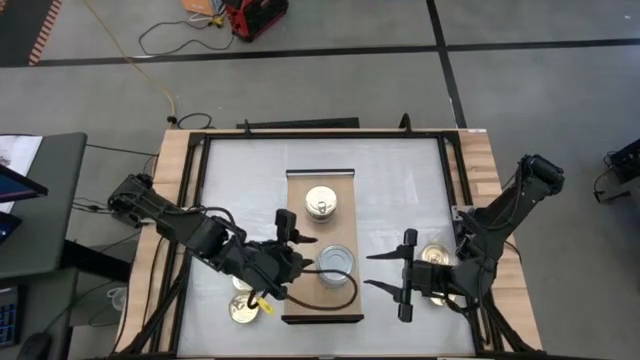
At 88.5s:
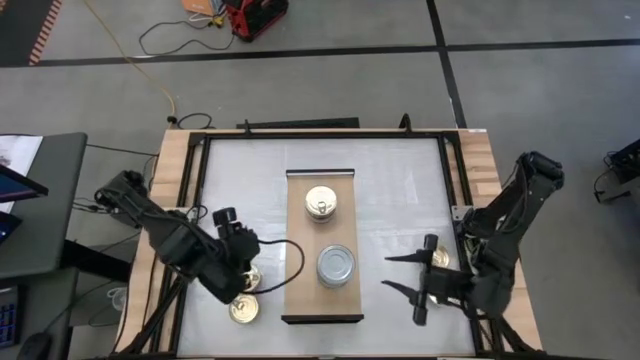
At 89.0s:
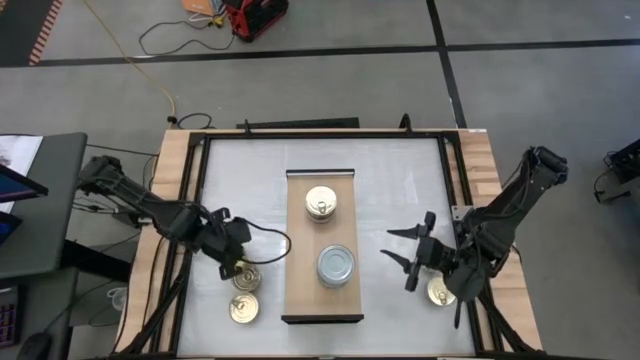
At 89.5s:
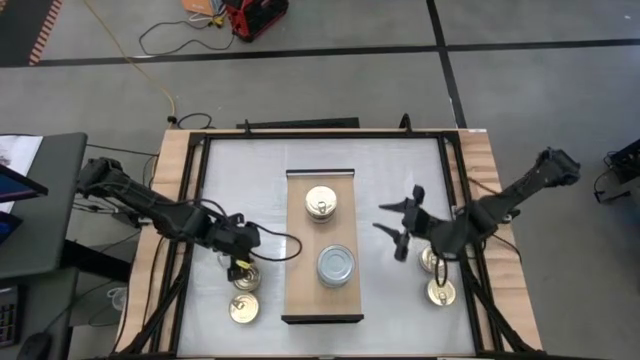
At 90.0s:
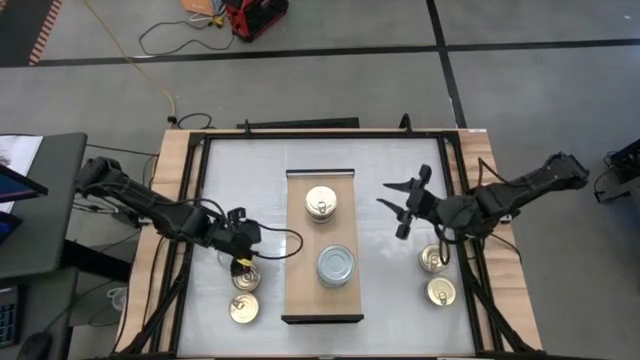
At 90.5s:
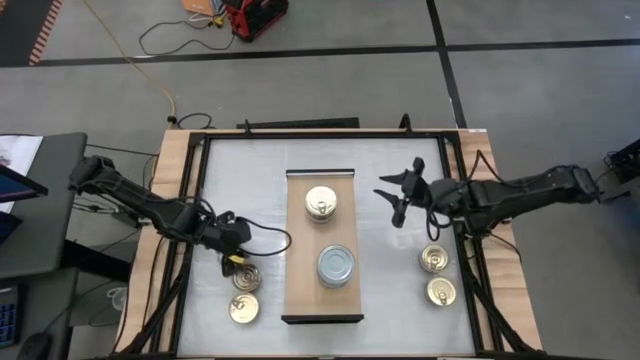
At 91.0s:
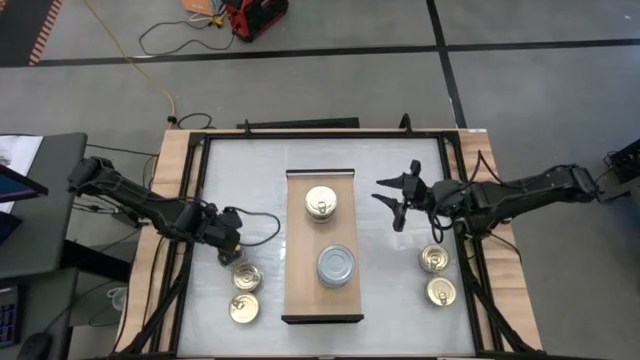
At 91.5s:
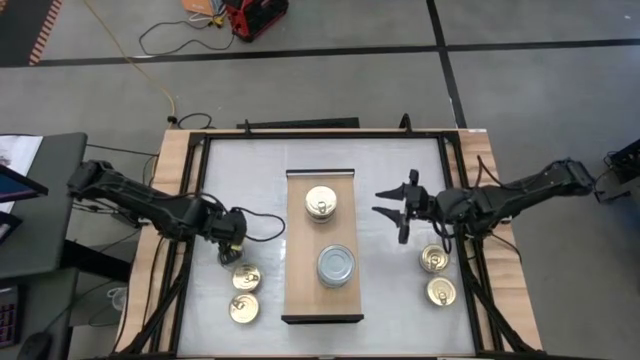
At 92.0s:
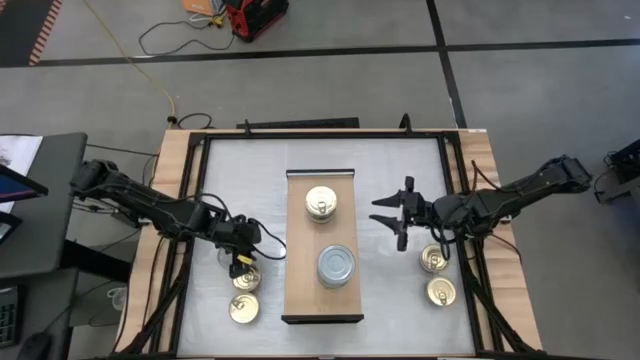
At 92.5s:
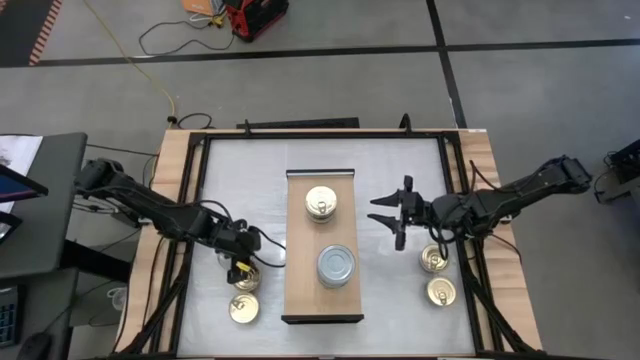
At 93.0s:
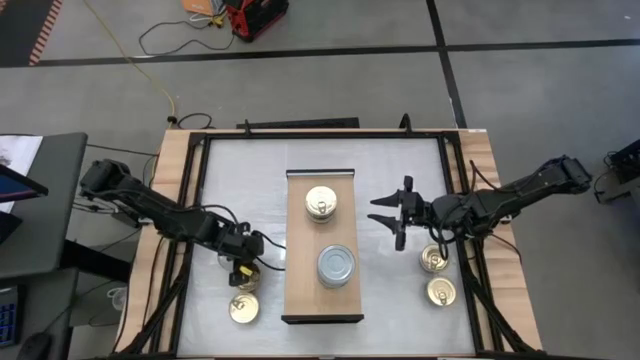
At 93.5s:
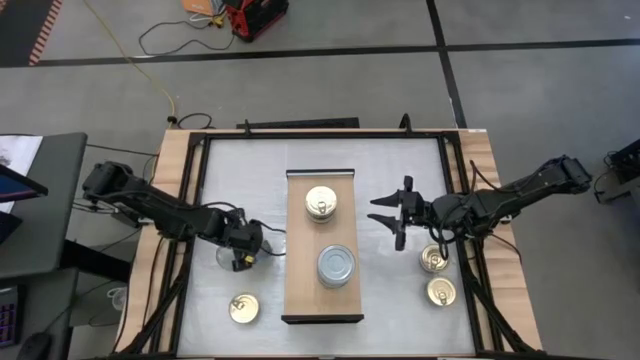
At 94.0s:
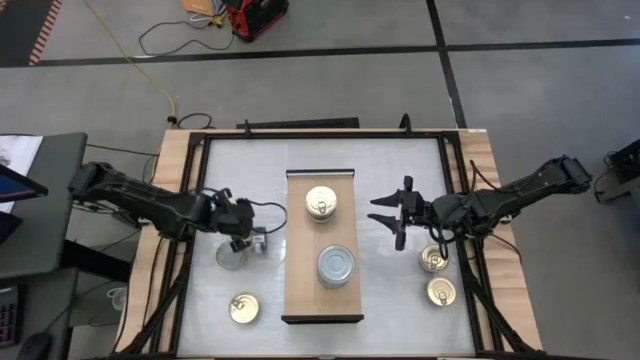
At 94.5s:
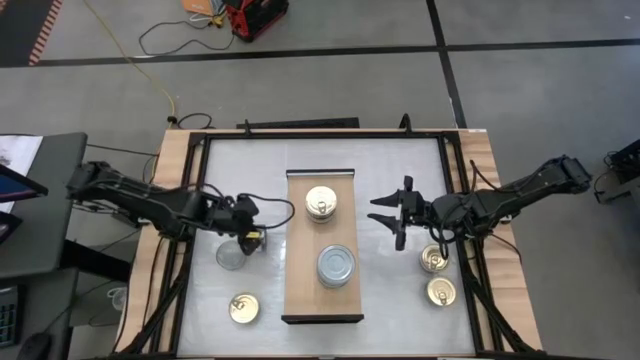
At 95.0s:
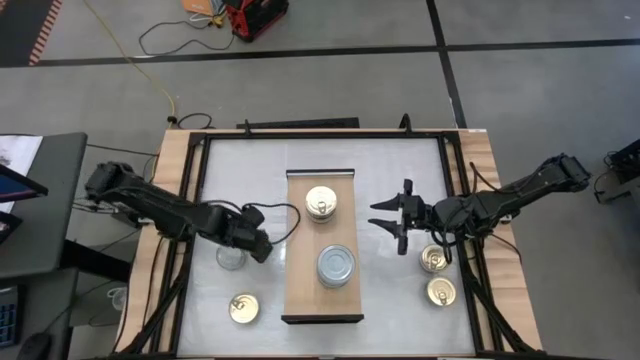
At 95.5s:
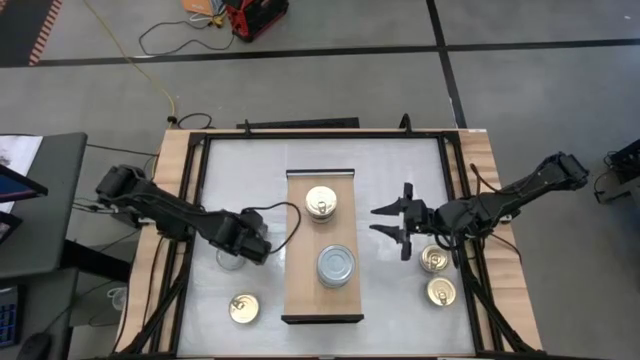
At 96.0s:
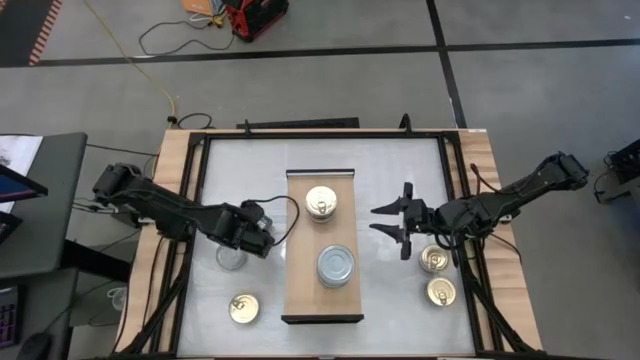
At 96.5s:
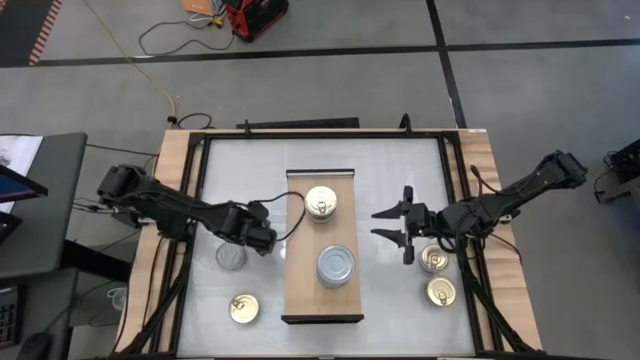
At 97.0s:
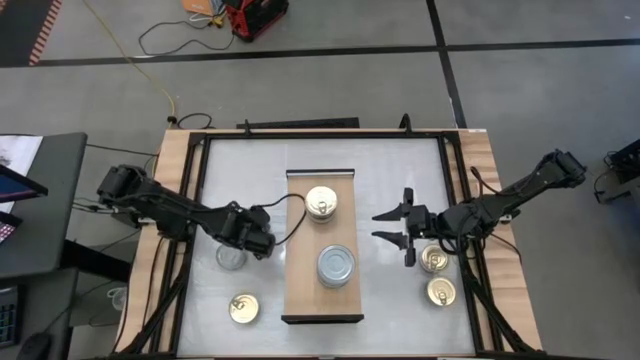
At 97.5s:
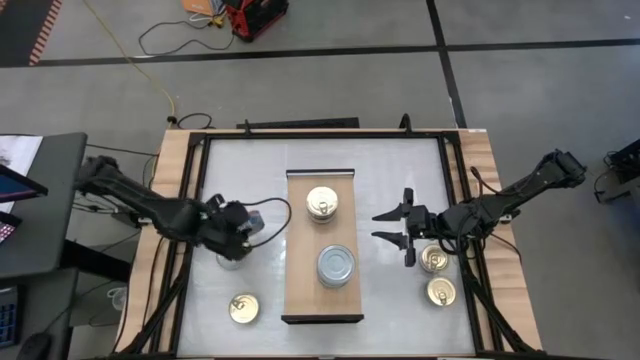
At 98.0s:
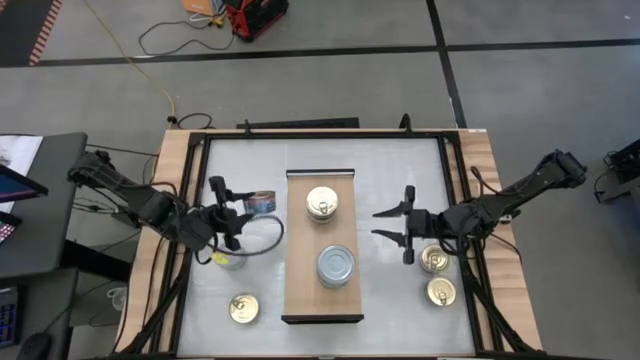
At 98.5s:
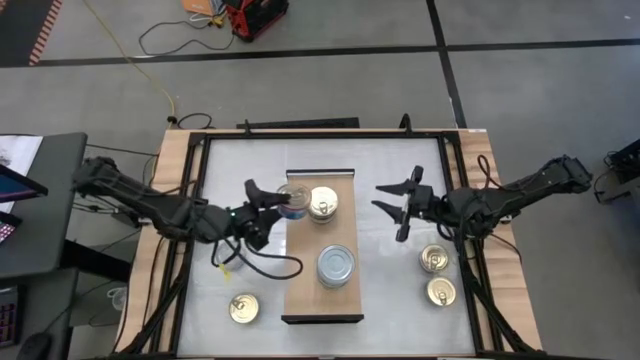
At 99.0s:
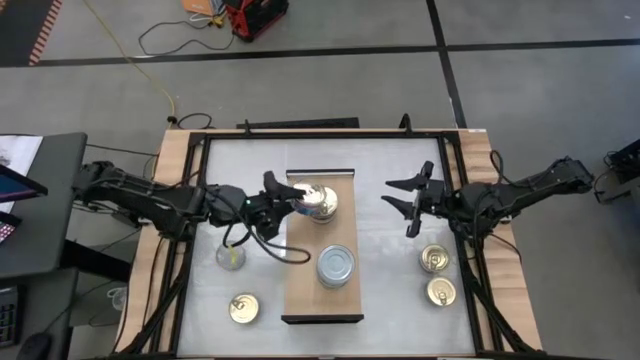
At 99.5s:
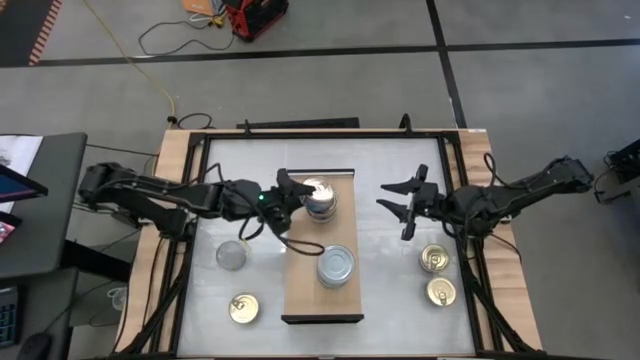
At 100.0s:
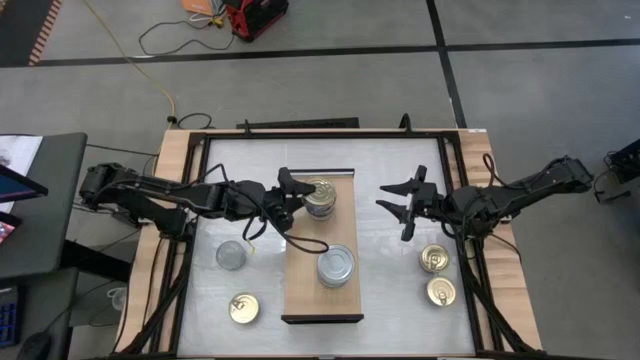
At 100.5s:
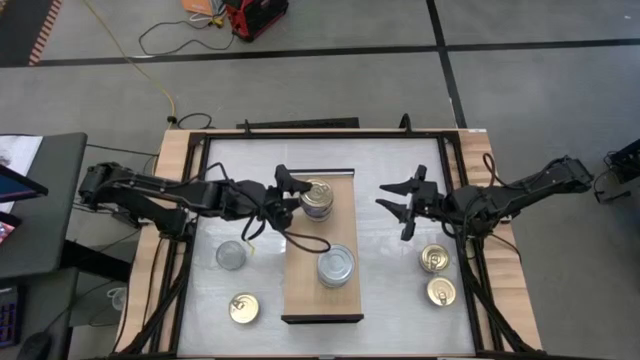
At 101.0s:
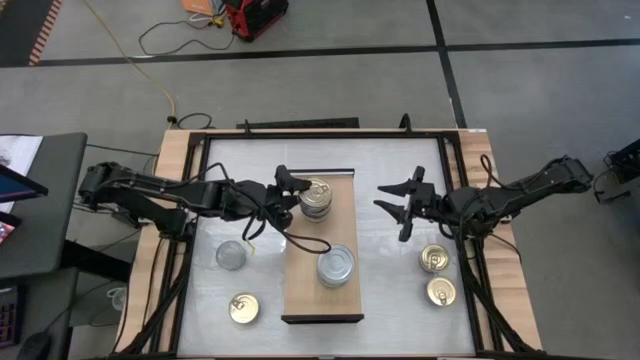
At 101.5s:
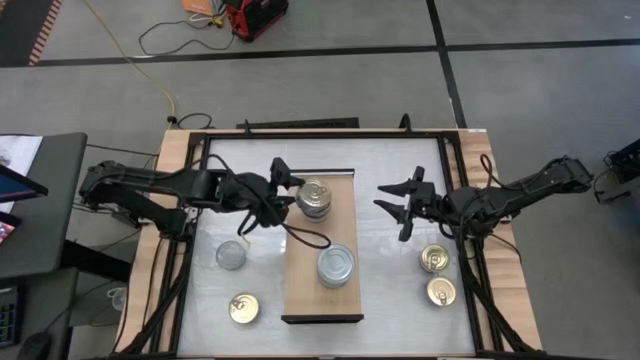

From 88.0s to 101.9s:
Task: Stack canned seafood by type on shelf
Stack the blue tuna can on top of the stacked blue tuna cans on the shelf

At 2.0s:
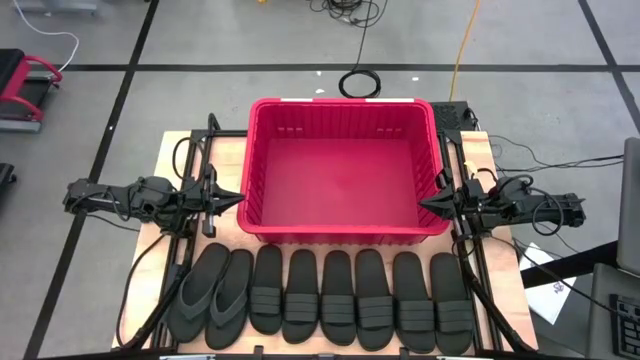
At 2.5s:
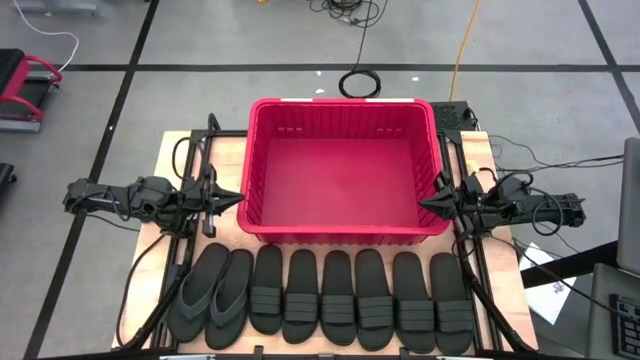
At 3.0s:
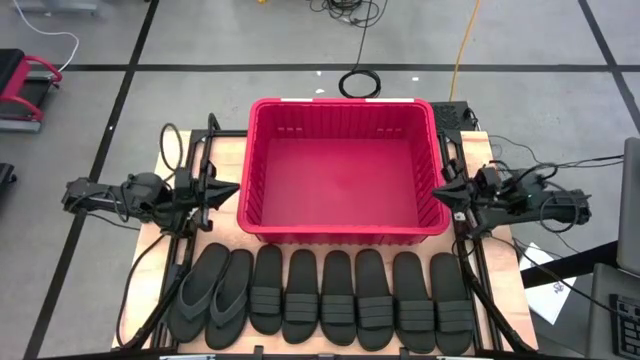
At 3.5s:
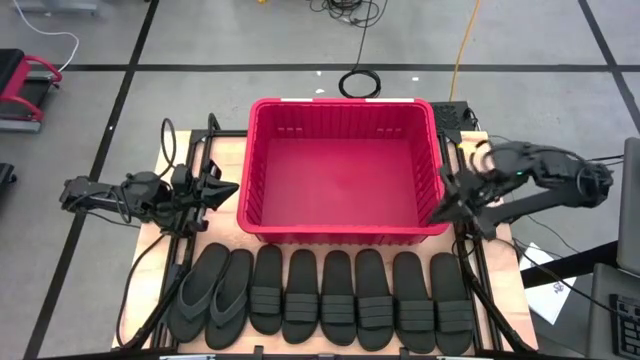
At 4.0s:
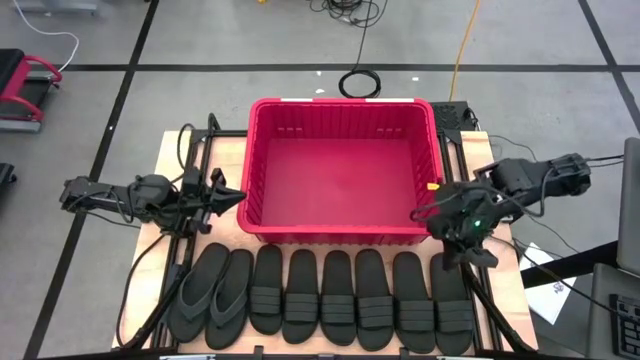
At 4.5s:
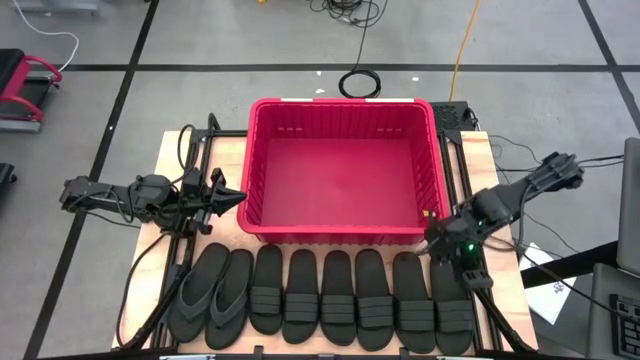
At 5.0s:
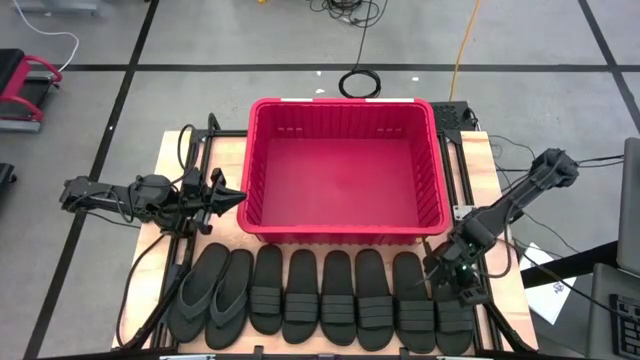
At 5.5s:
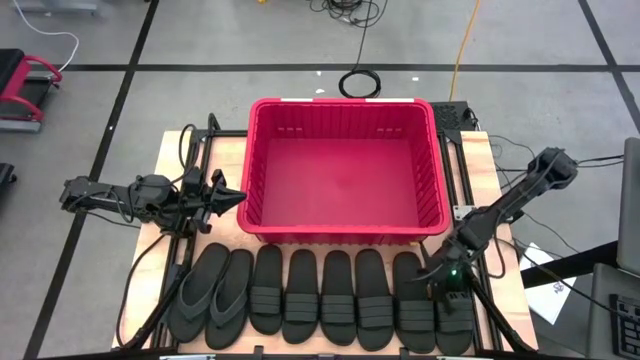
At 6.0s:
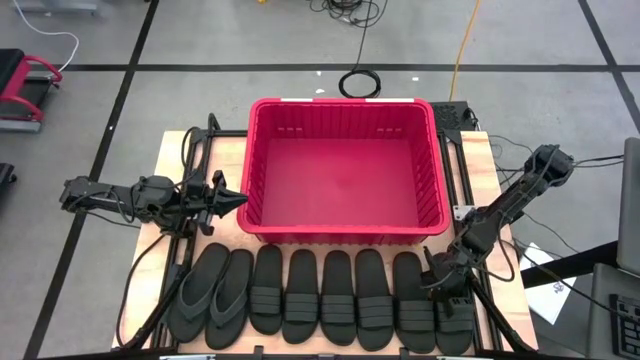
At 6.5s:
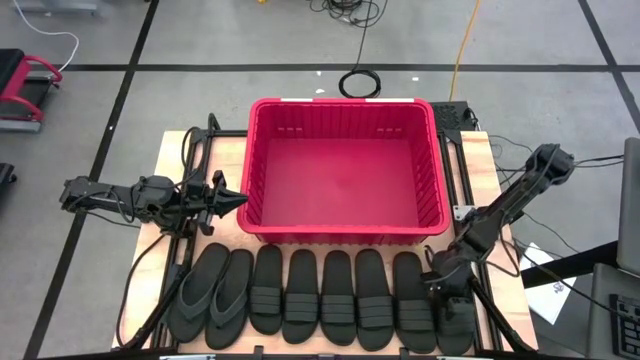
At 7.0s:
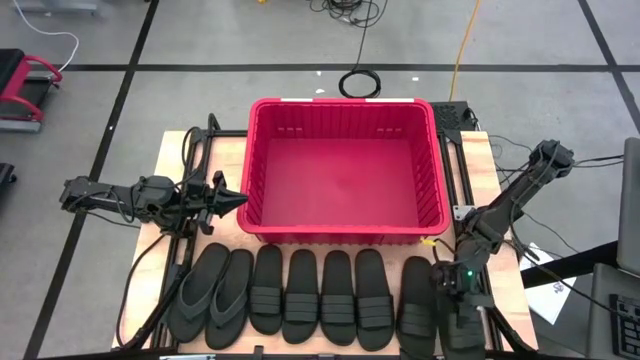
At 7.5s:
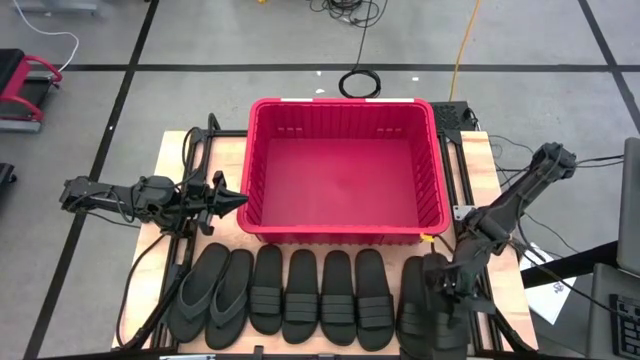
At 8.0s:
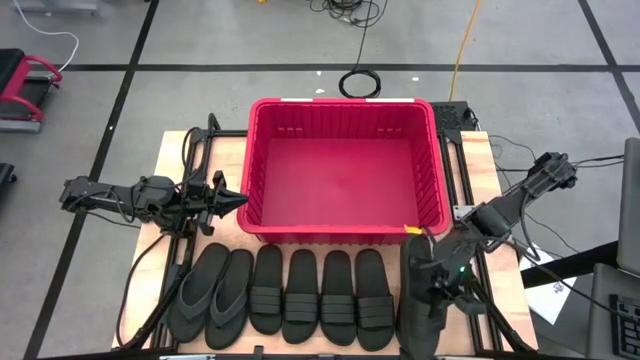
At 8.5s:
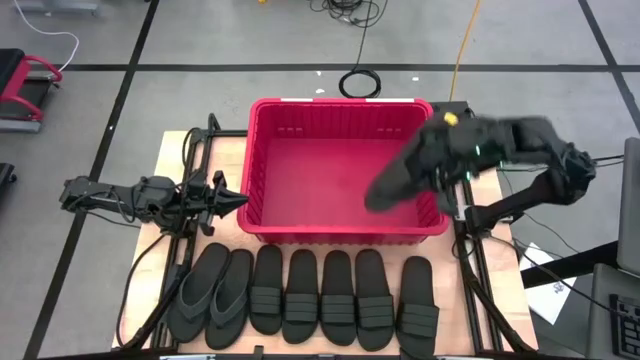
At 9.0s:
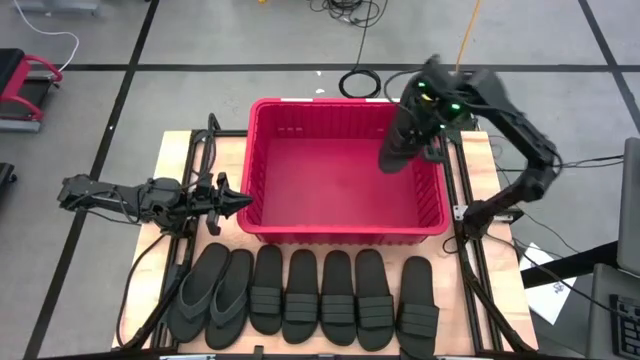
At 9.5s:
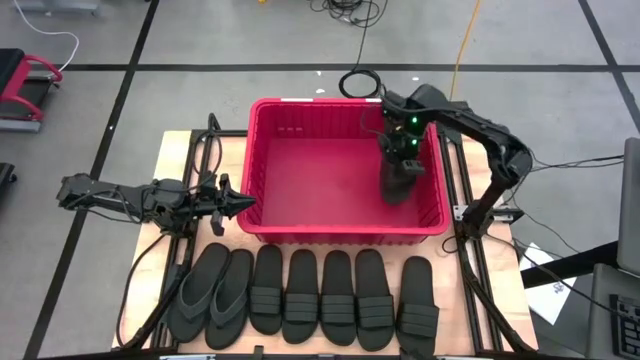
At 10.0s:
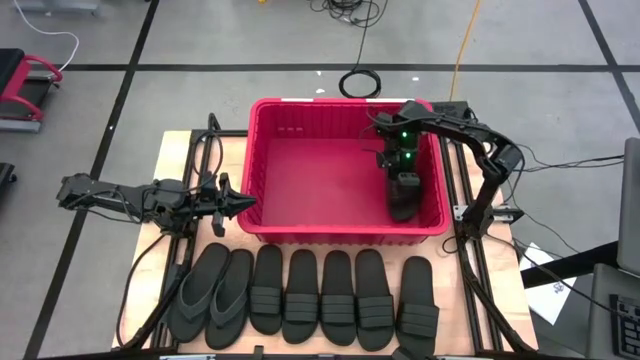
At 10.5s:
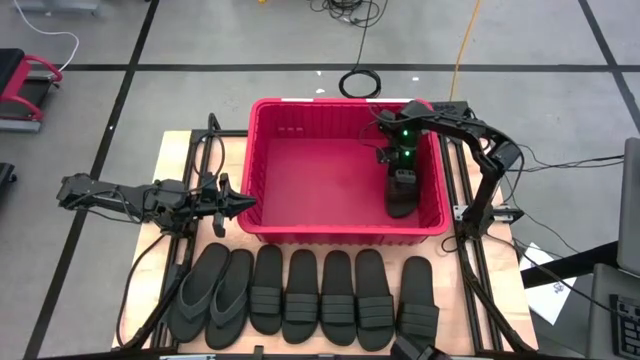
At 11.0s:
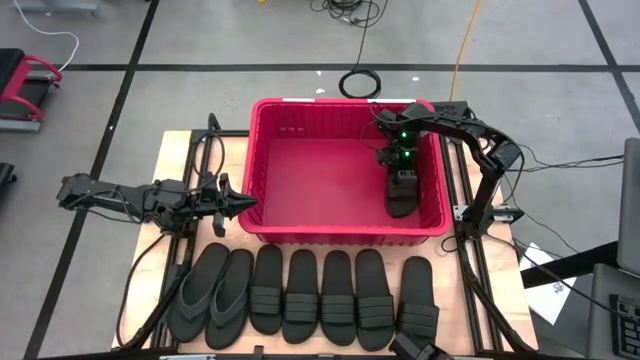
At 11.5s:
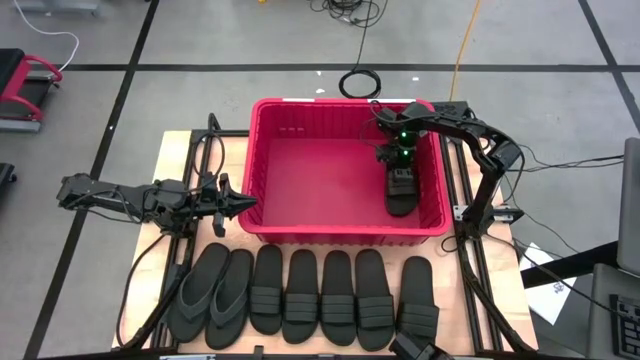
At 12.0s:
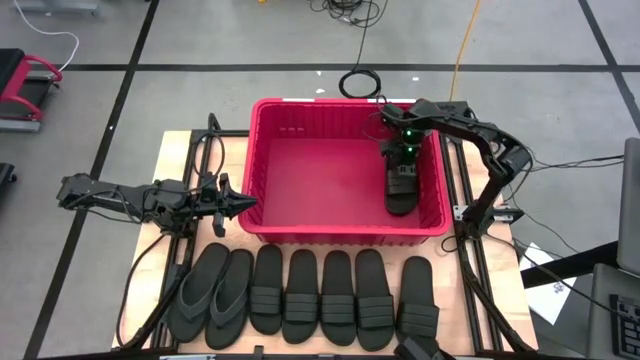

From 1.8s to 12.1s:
Task: Pick and place slides into bin
Put the black slipper into the red organizer bin
